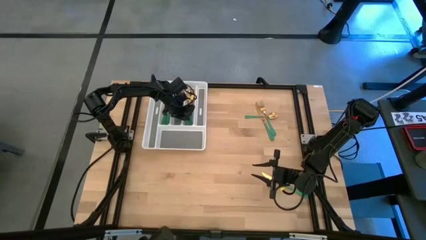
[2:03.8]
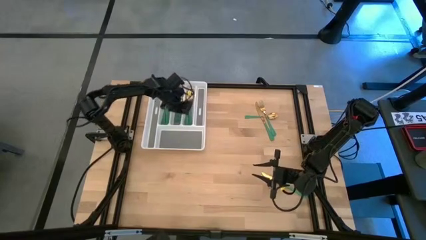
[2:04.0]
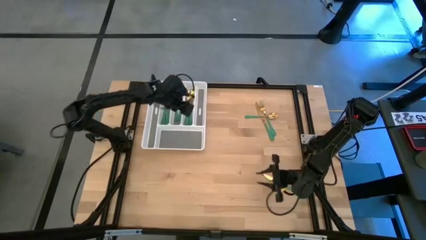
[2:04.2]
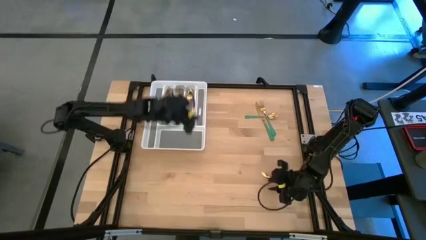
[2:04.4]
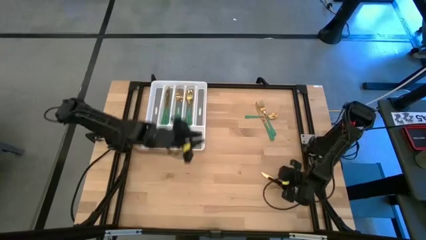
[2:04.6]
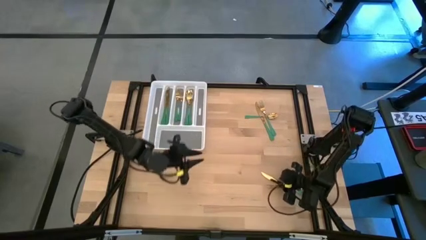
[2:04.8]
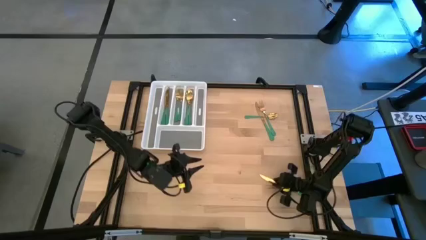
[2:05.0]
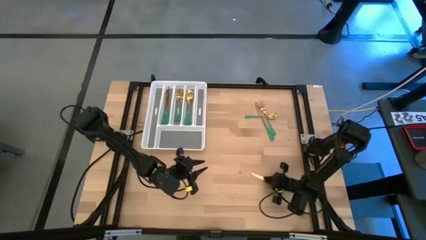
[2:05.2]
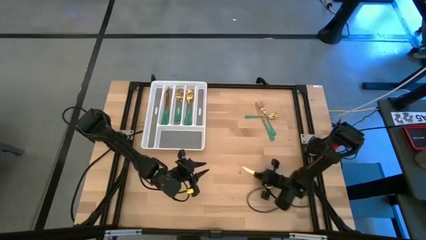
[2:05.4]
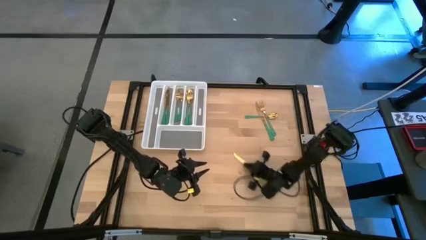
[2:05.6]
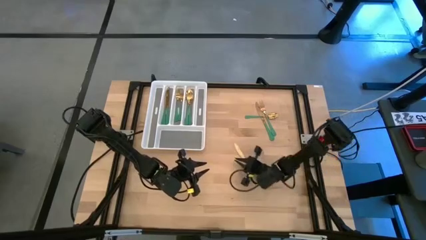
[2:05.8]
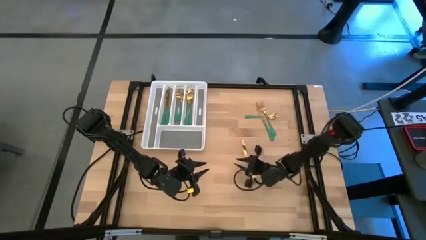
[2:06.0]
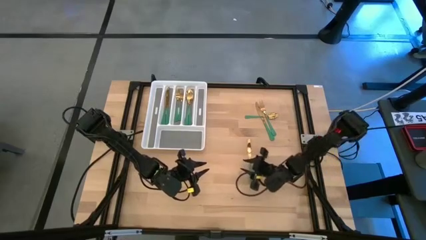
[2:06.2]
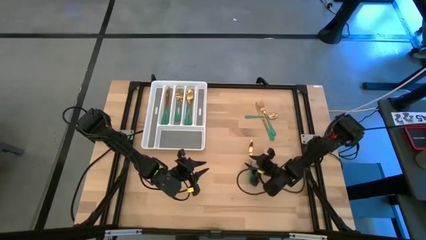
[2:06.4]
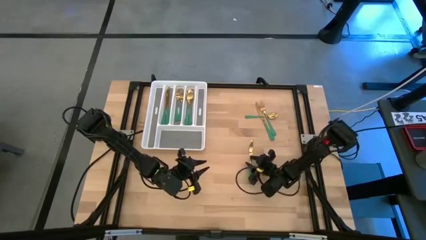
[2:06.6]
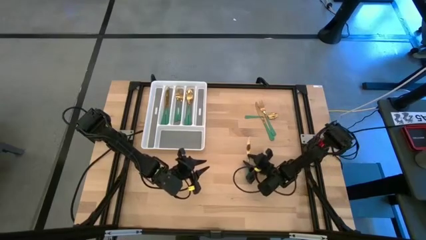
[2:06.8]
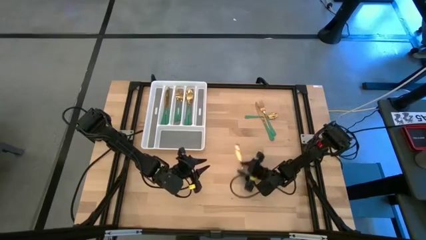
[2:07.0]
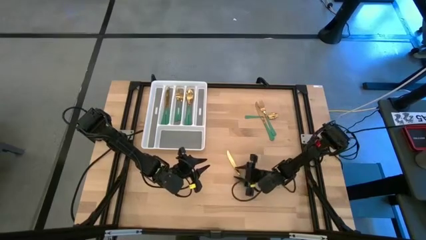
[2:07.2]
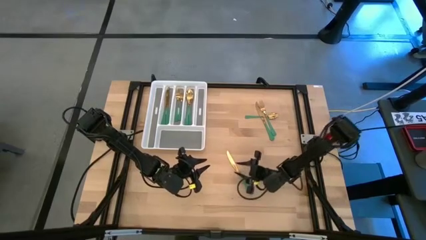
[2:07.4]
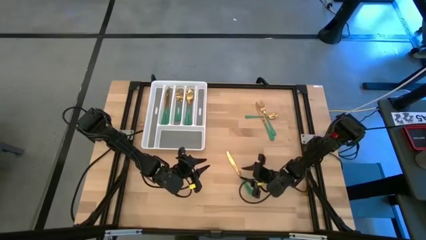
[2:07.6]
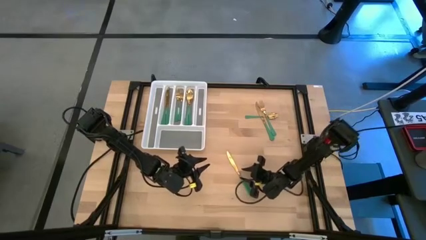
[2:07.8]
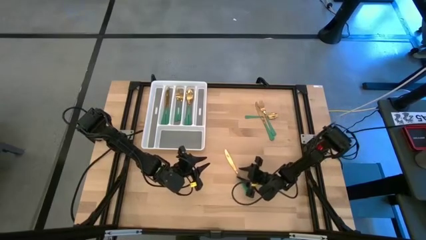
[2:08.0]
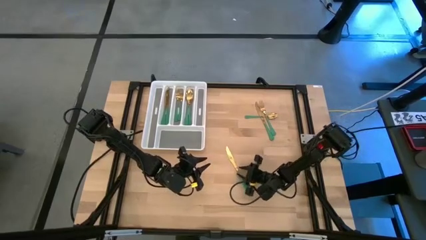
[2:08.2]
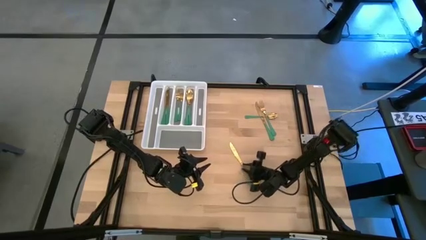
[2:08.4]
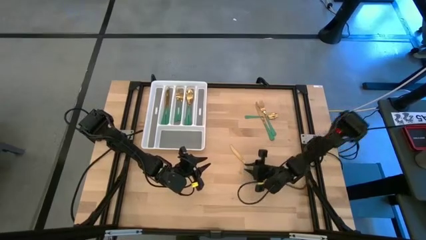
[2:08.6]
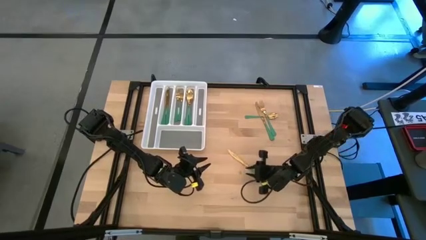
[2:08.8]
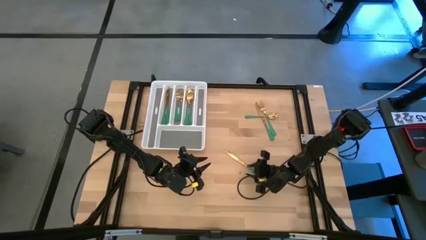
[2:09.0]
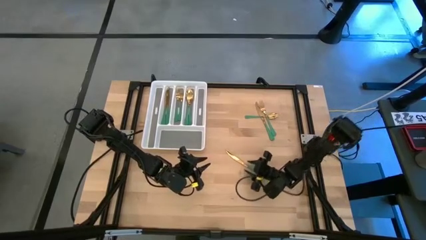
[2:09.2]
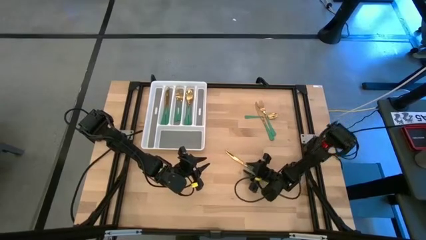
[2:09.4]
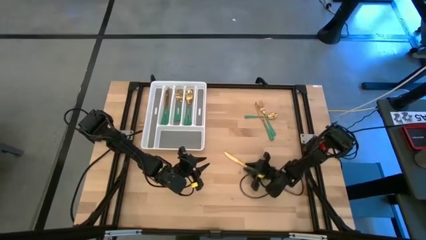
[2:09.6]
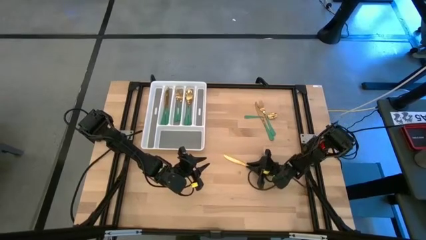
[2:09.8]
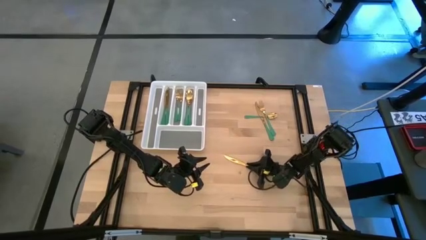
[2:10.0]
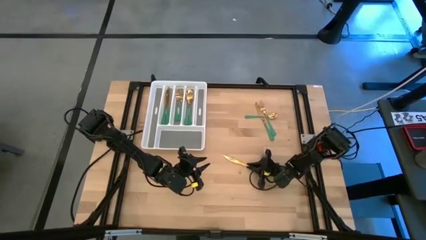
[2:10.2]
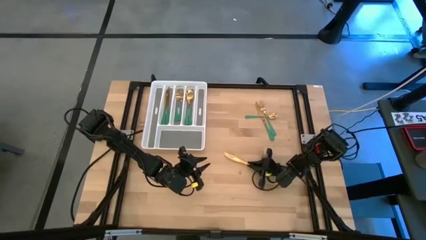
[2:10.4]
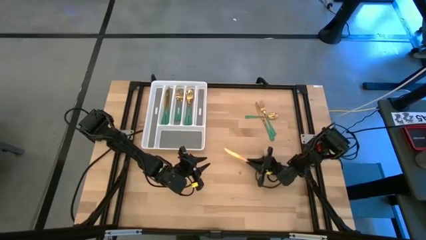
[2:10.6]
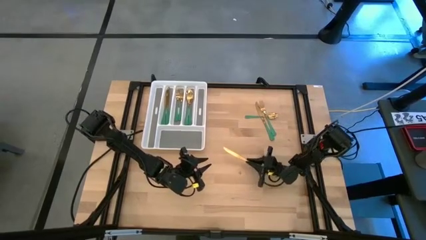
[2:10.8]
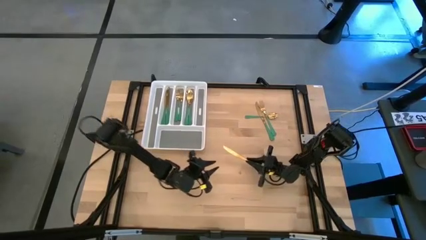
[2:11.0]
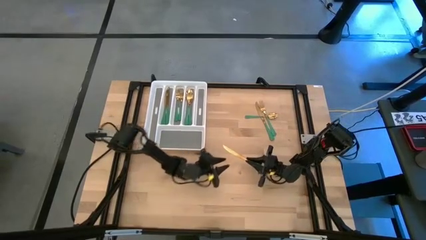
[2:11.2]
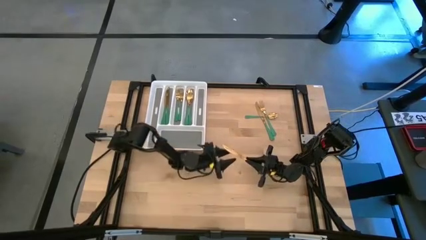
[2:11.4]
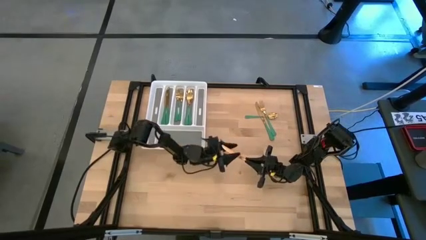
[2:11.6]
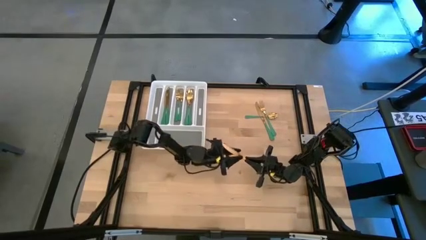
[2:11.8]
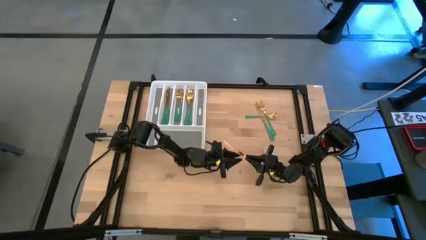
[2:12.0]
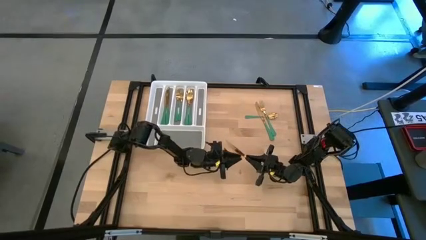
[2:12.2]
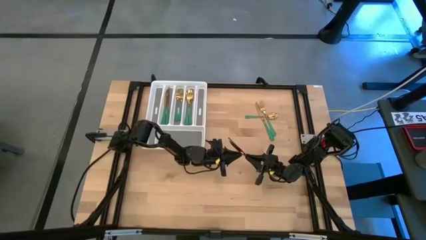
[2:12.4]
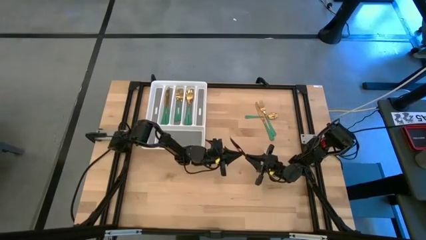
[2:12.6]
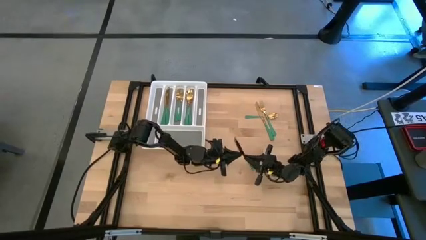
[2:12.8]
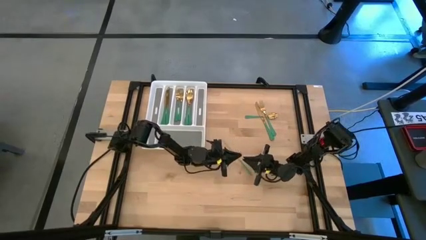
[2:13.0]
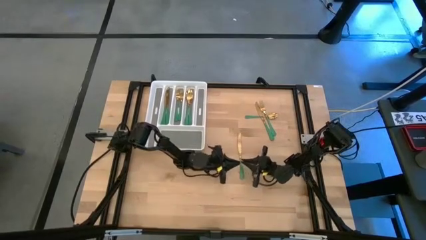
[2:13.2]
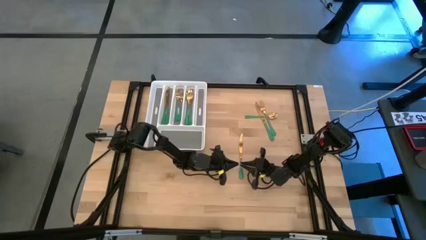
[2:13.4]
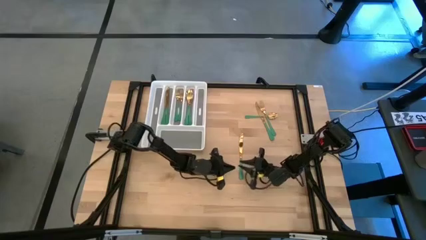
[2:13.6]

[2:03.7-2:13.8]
Task: Sort silverware
Put the green knife into the white cutlery tray

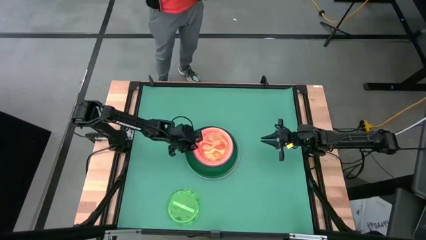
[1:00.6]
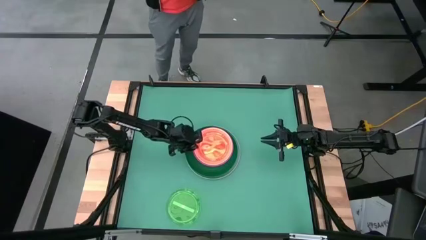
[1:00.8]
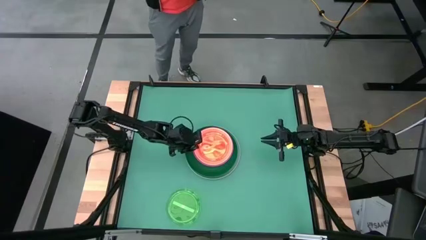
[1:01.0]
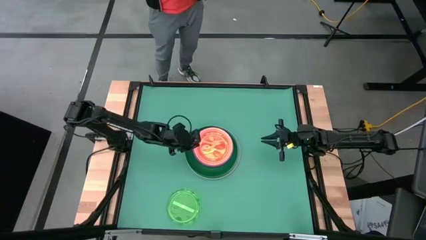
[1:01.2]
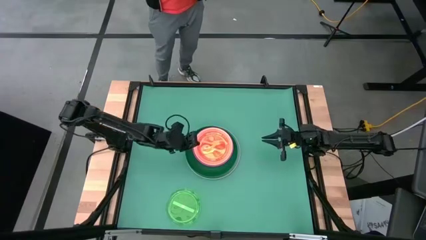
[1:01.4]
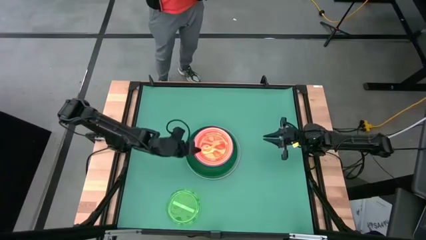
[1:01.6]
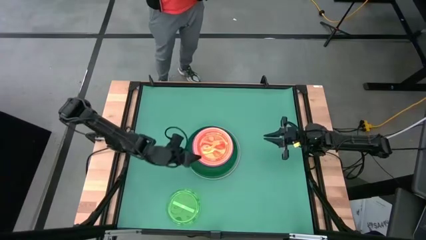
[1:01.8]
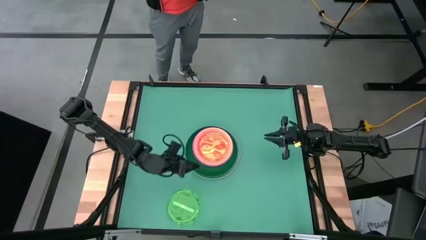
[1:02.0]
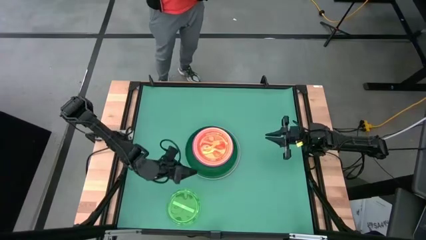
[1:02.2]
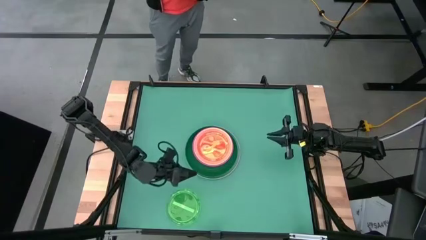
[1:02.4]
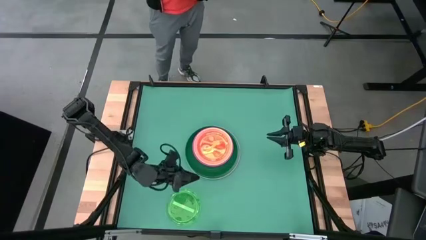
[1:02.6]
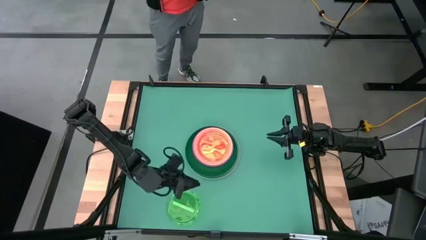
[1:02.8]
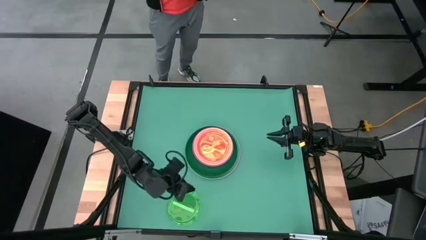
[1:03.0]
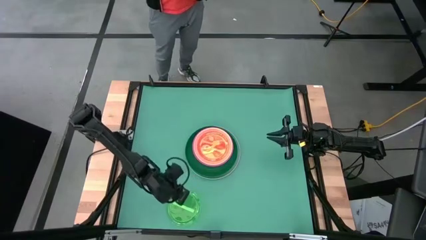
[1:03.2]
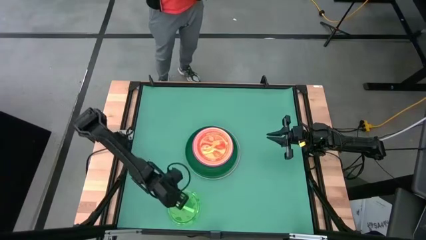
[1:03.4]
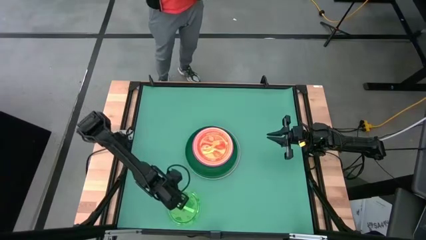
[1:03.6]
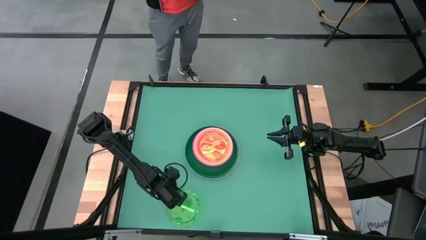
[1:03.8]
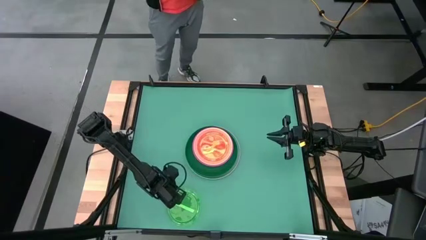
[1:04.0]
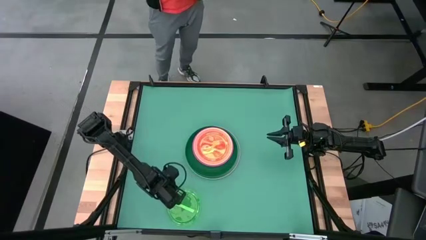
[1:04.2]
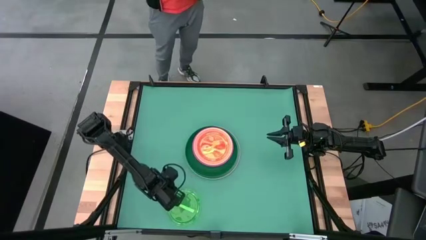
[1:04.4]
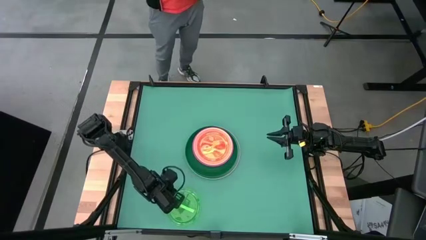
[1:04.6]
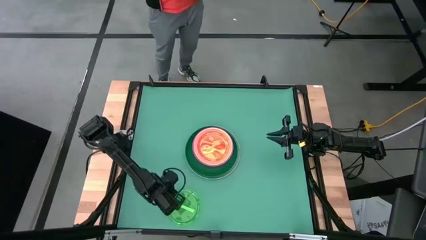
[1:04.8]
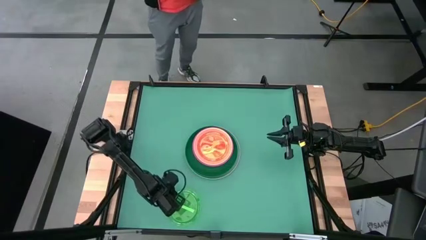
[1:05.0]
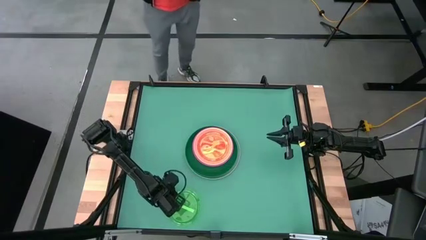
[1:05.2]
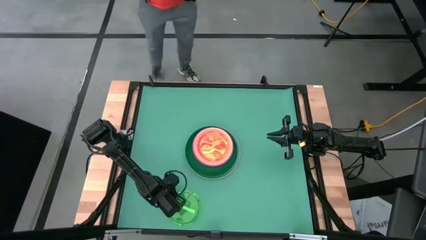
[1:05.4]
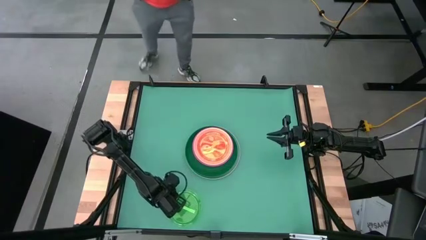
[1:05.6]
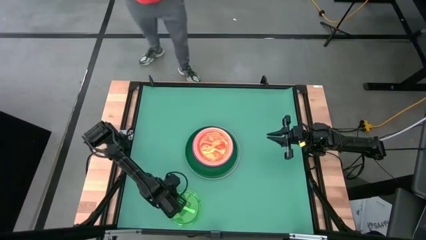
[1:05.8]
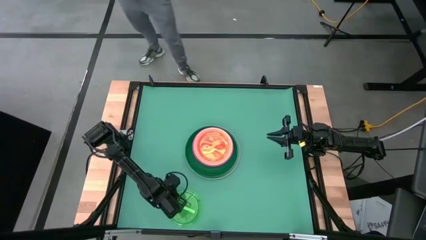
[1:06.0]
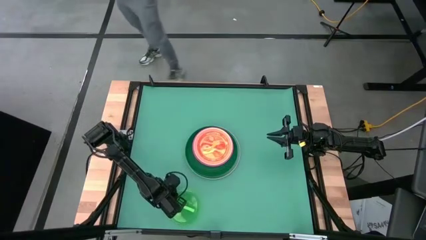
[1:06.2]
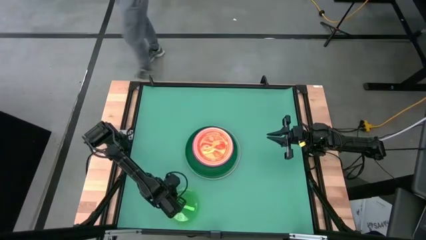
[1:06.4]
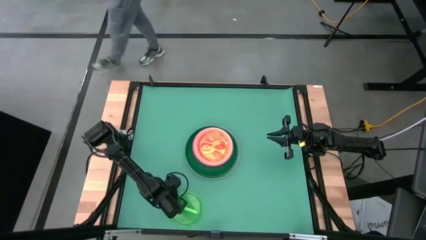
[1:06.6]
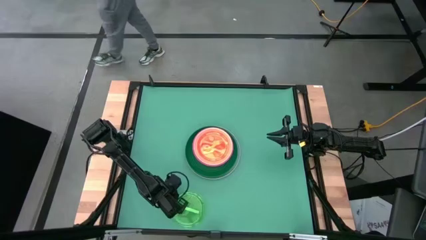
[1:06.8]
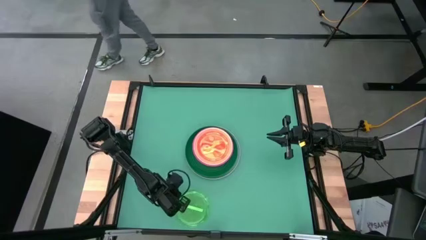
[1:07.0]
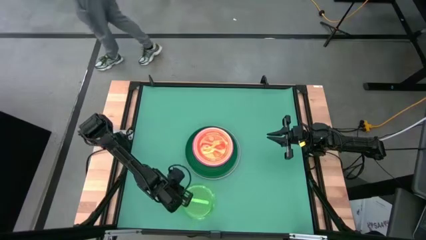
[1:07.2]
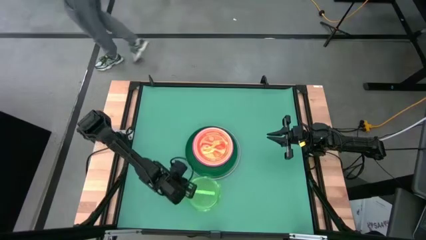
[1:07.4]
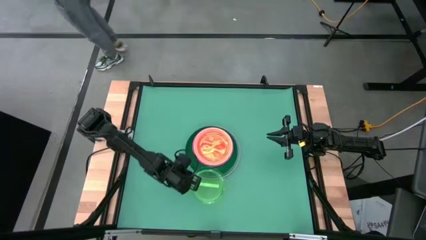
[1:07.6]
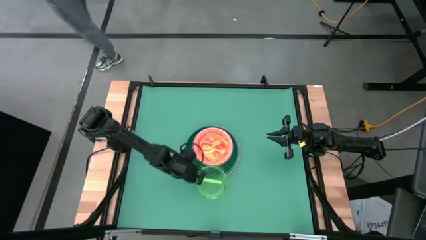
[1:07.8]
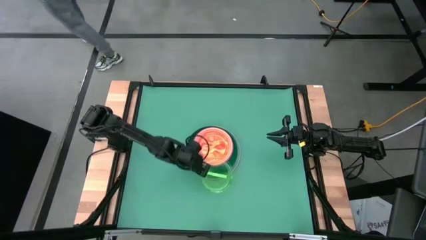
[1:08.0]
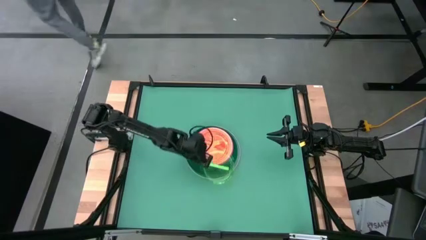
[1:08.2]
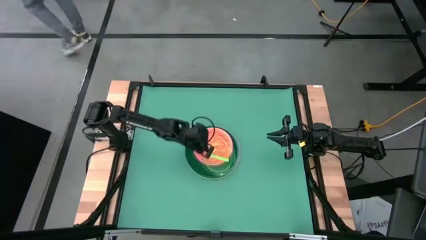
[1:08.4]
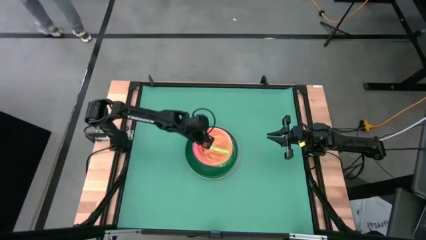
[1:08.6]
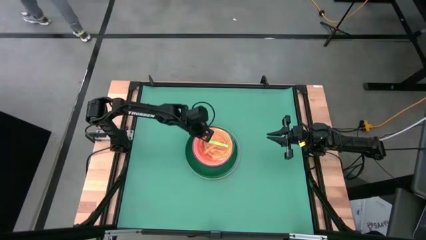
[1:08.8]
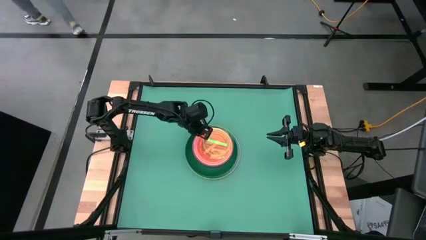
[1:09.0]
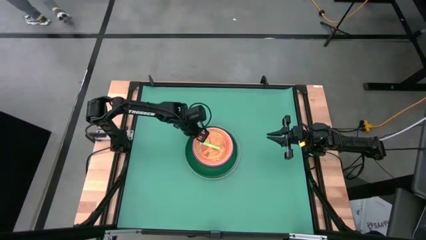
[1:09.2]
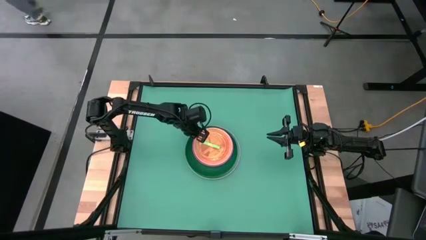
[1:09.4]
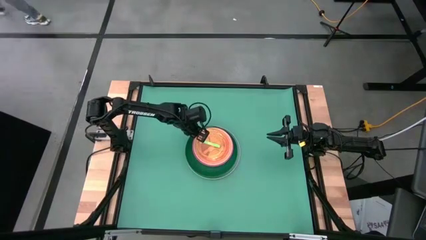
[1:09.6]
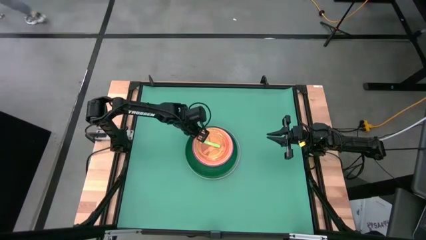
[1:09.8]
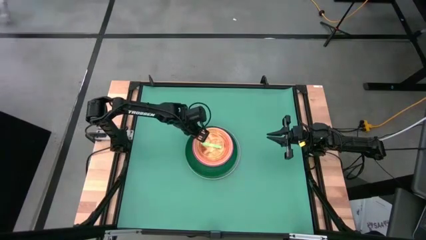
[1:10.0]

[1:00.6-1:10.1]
Task: Stack plastic plates
Stack the transparent green plate on top of the transparent orange plate
